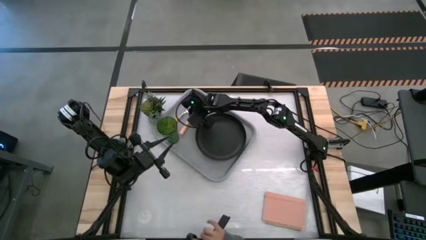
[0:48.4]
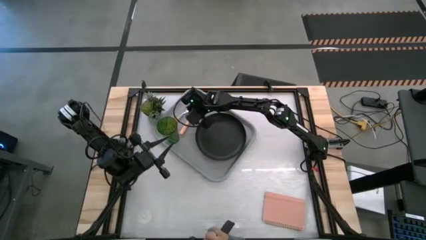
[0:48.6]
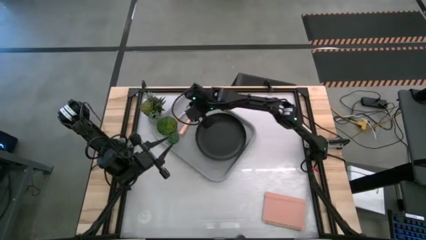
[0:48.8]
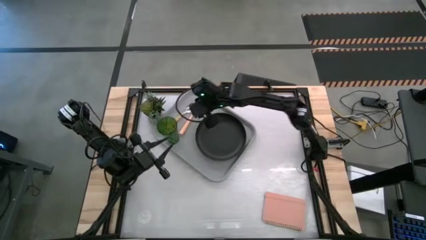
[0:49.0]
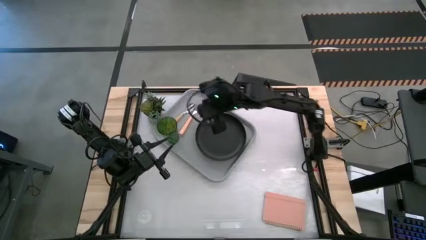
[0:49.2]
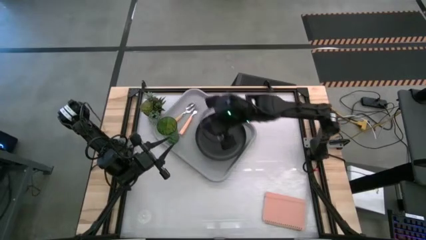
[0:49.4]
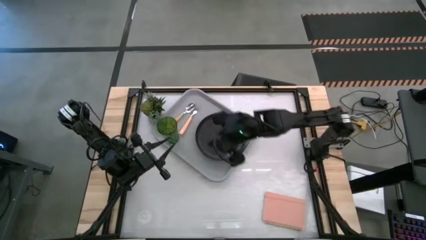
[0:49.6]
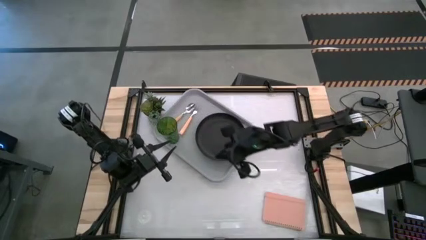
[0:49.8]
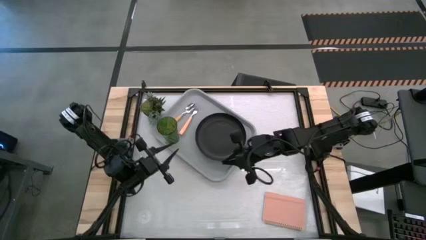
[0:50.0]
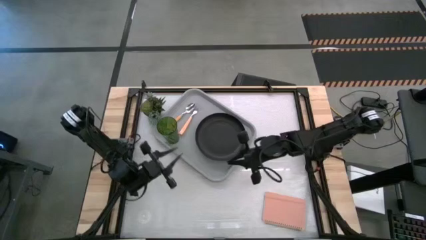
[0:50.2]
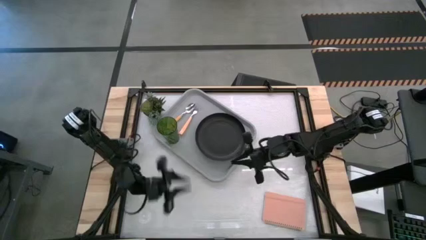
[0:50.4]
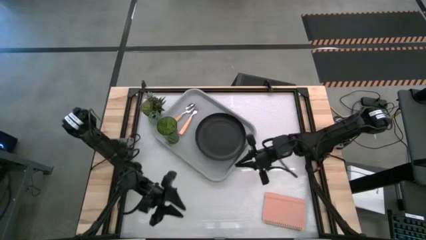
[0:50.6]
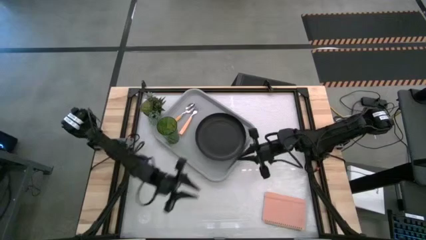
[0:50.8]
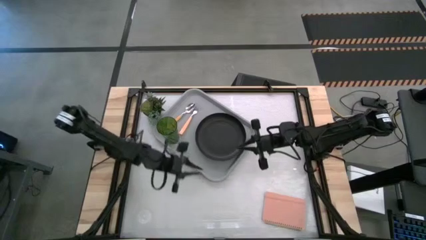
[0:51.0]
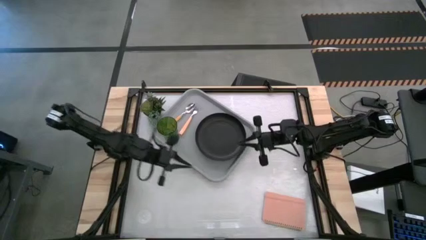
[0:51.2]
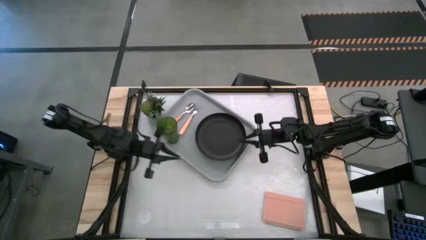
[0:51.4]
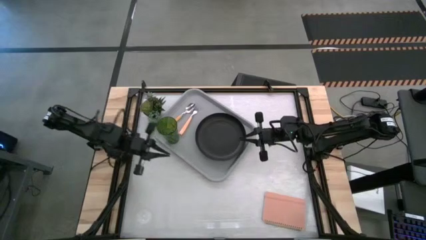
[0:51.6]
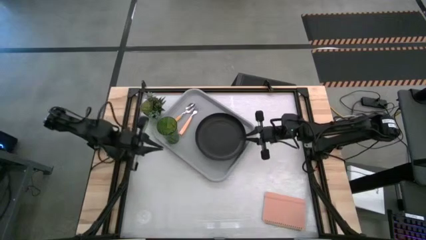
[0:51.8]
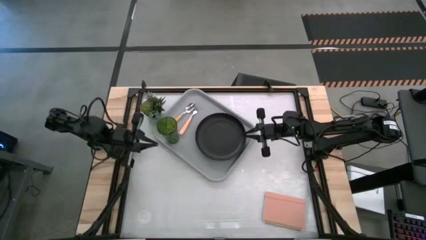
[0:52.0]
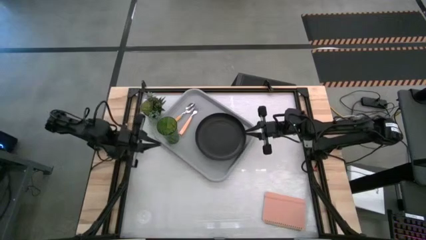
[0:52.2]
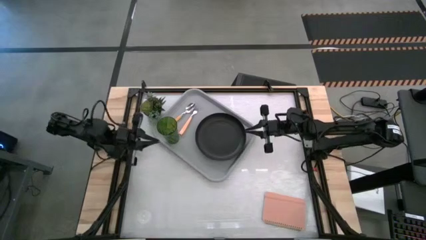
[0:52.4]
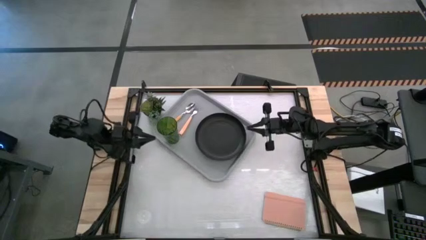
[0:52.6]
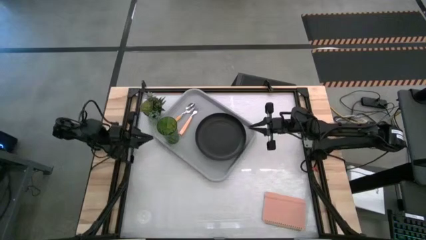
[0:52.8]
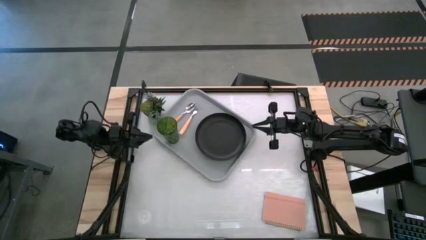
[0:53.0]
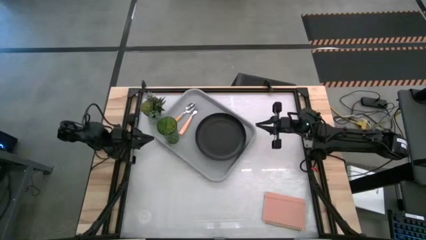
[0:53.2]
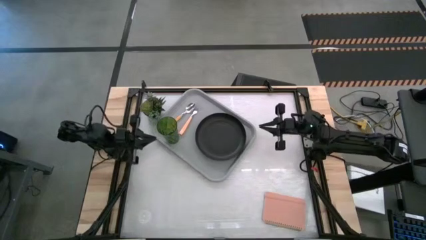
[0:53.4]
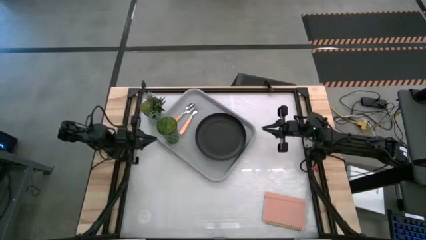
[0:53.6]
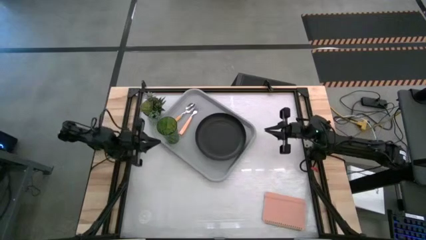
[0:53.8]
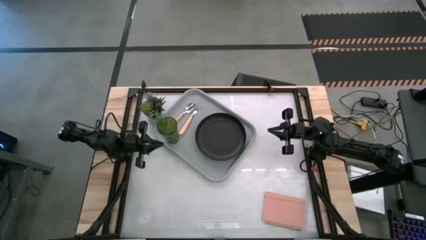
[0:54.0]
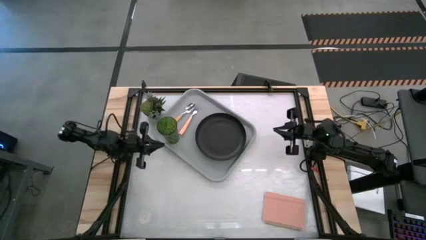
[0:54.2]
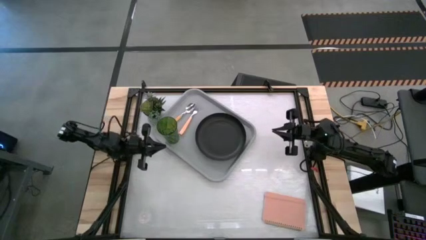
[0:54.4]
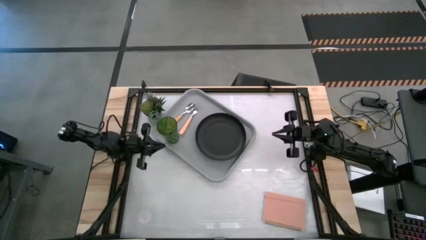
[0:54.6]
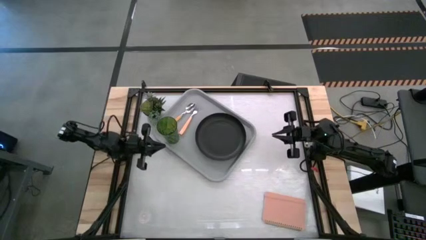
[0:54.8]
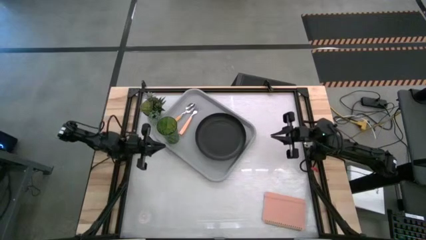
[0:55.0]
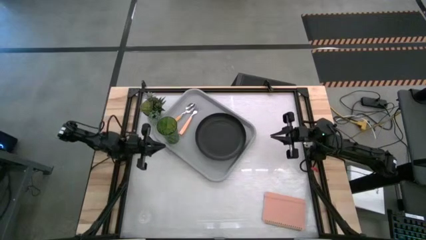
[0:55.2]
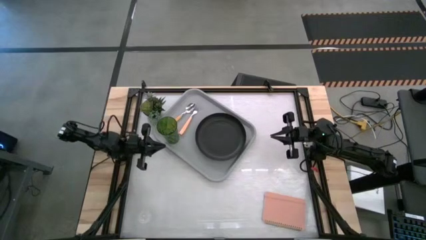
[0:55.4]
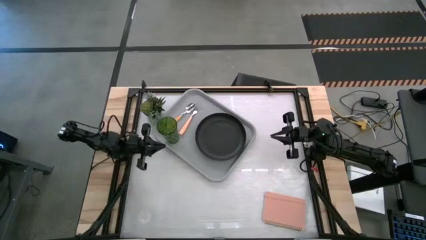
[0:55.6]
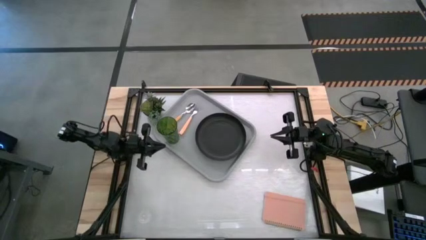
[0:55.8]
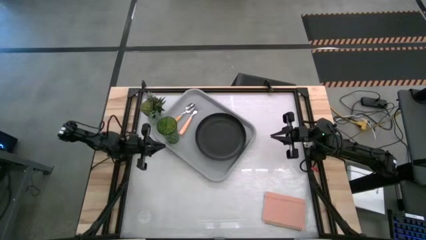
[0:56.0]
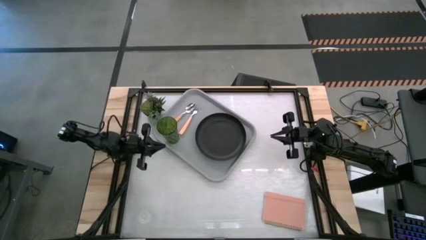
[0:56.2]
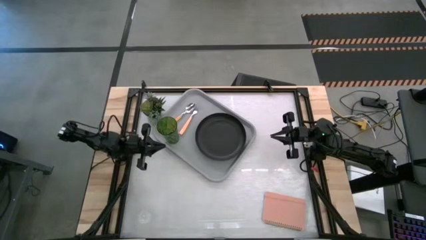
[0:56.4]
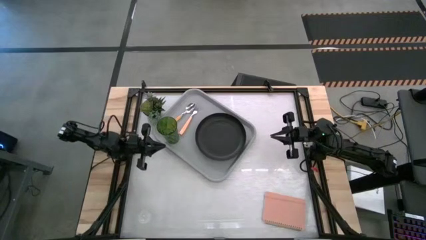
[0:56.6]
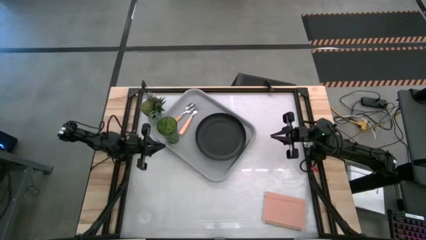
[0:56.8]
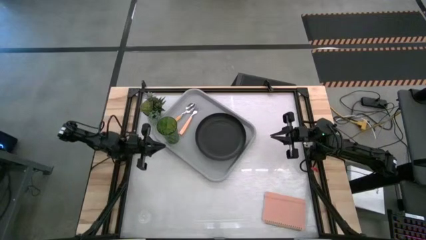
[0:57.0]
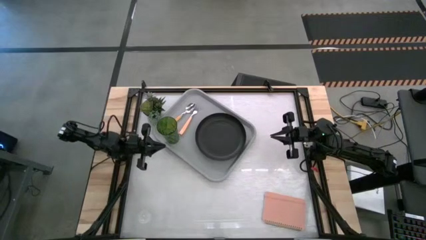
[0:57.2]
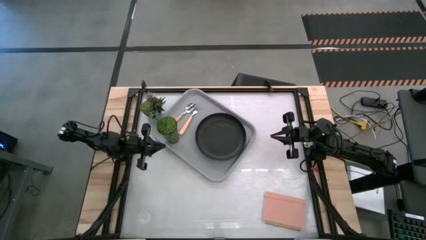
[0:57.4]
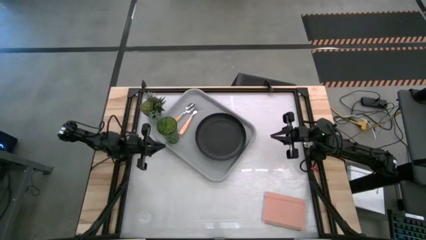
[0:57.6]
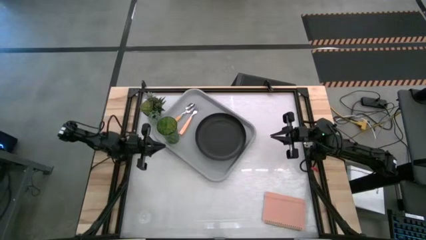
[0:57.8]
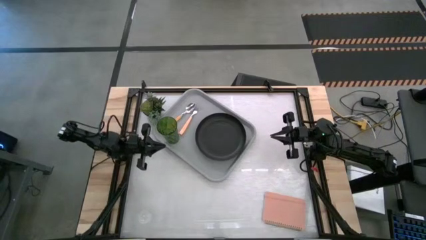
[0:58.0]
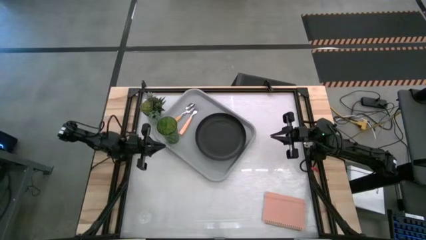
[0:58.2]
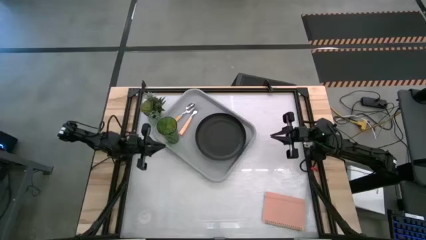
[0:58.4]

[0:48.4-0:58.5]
Task: Pick and place plate/cup/fork/spoon on tray
Return to Home Position
